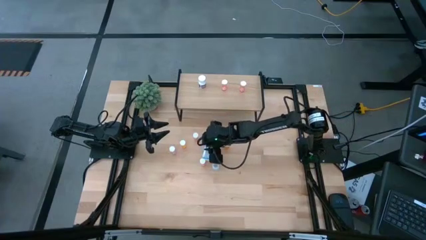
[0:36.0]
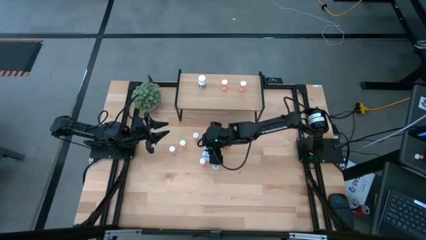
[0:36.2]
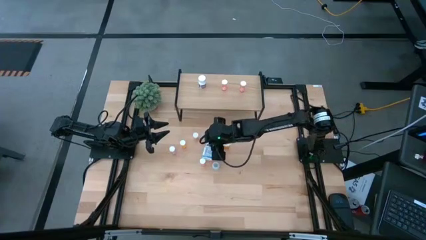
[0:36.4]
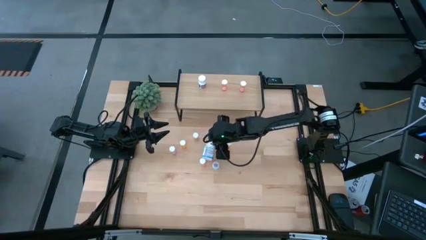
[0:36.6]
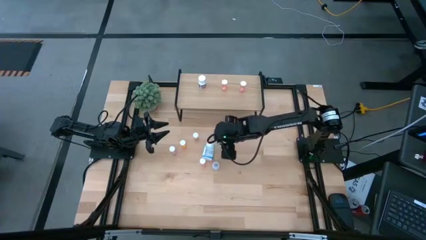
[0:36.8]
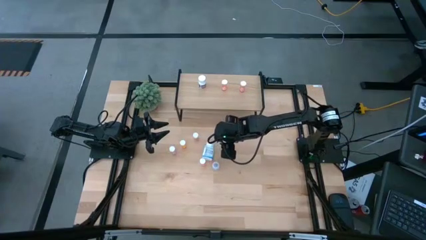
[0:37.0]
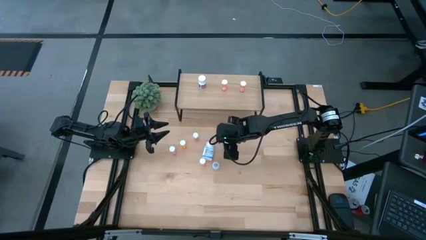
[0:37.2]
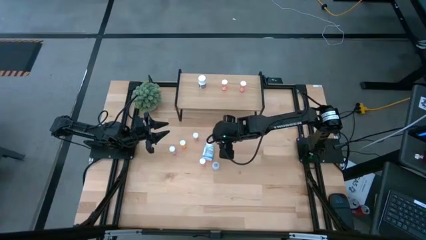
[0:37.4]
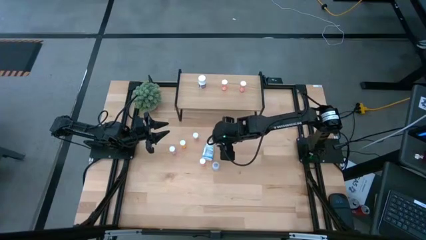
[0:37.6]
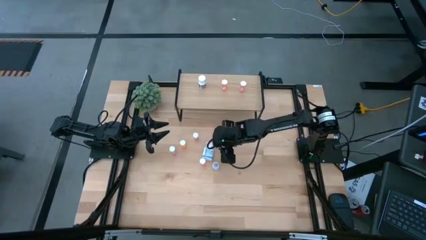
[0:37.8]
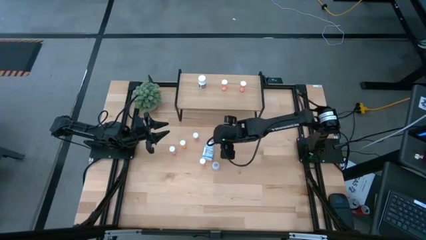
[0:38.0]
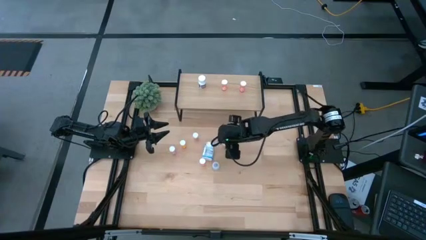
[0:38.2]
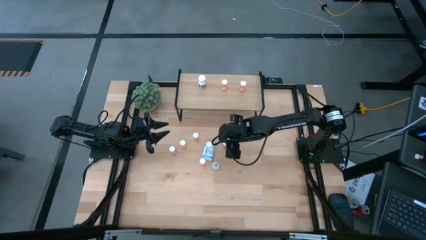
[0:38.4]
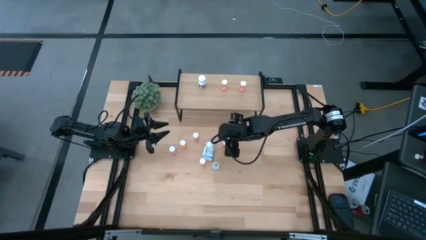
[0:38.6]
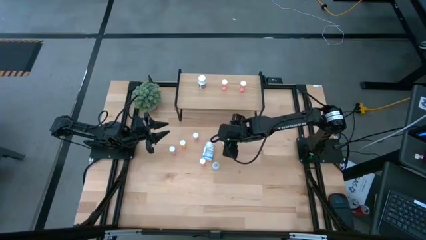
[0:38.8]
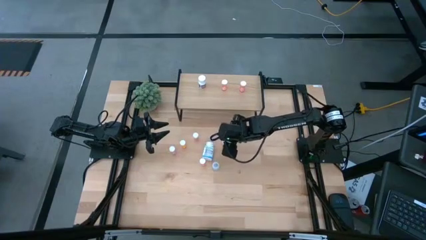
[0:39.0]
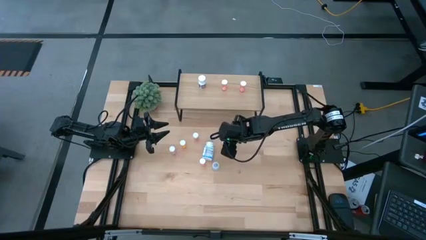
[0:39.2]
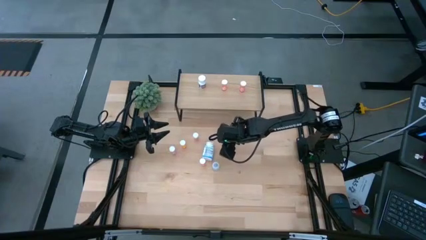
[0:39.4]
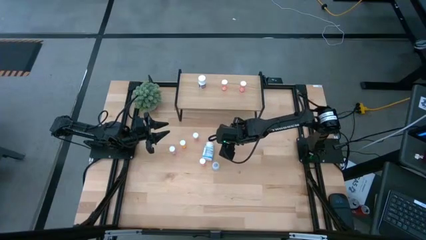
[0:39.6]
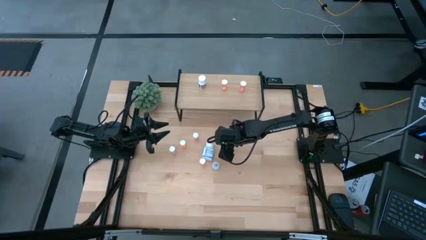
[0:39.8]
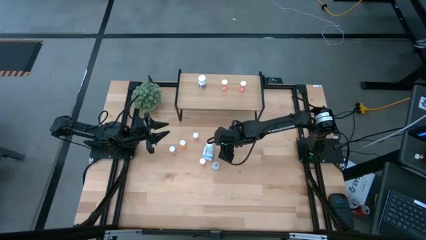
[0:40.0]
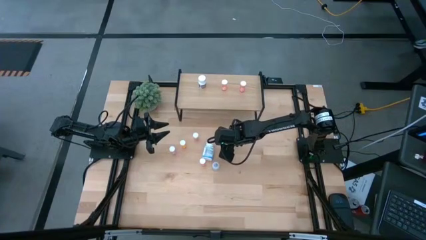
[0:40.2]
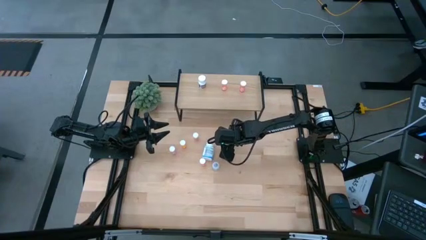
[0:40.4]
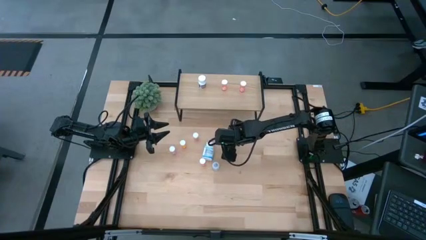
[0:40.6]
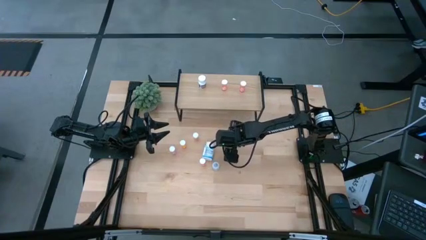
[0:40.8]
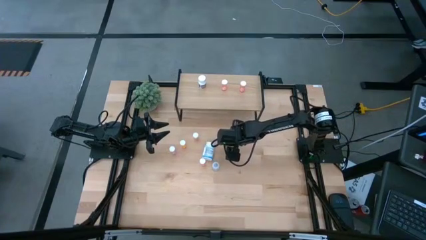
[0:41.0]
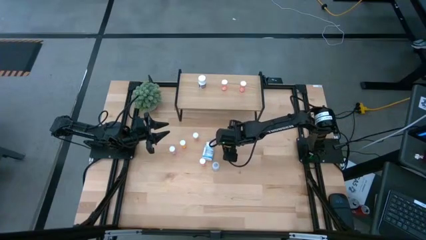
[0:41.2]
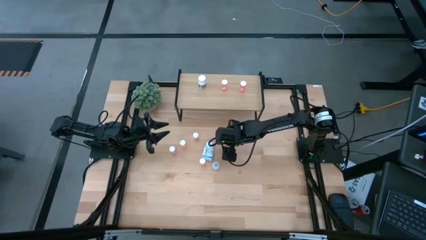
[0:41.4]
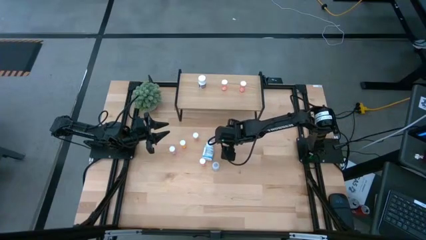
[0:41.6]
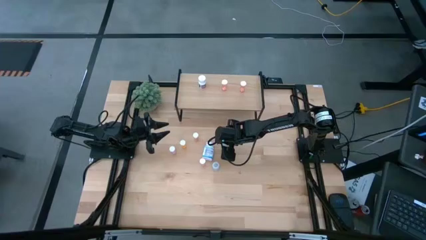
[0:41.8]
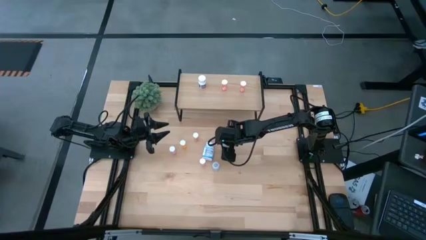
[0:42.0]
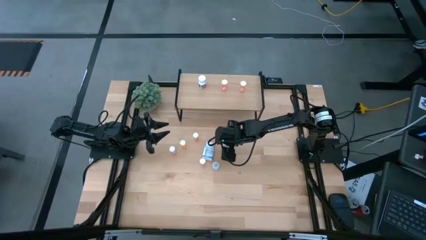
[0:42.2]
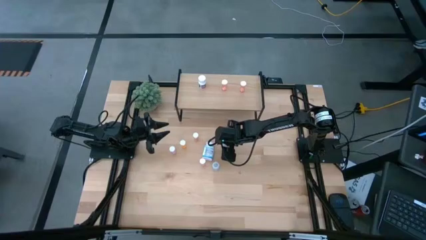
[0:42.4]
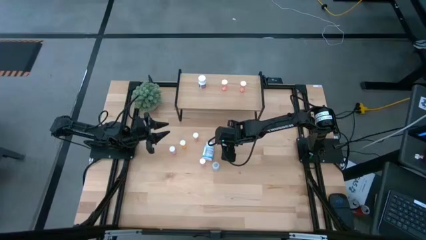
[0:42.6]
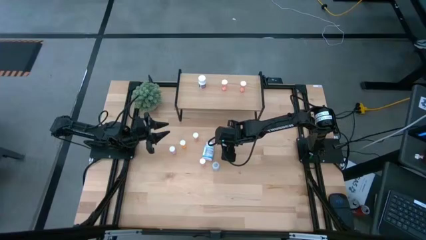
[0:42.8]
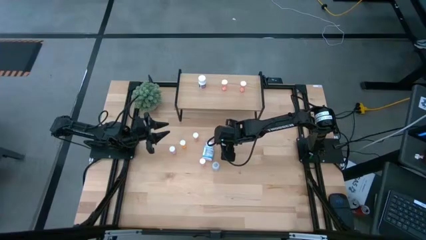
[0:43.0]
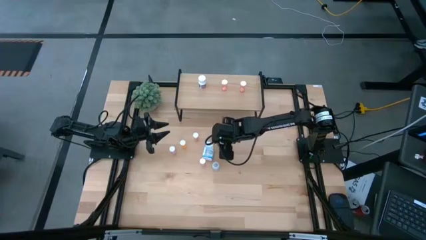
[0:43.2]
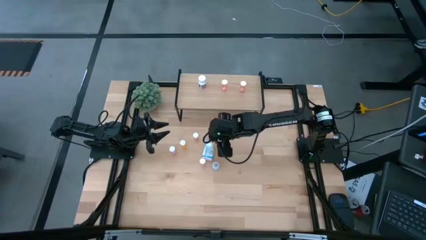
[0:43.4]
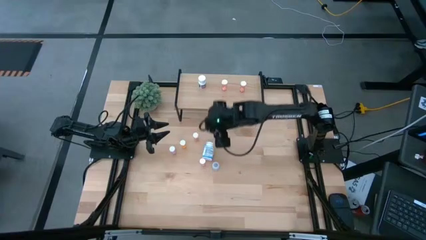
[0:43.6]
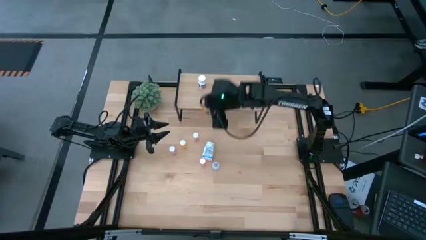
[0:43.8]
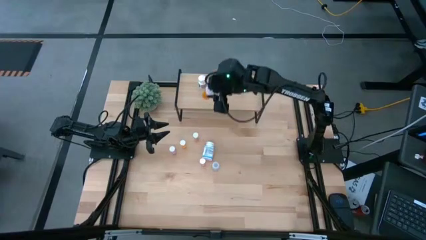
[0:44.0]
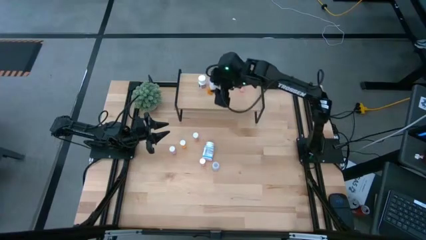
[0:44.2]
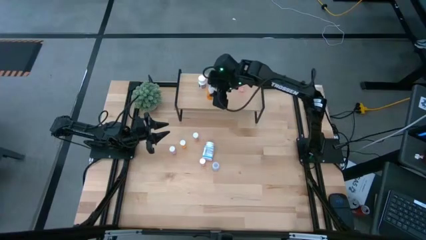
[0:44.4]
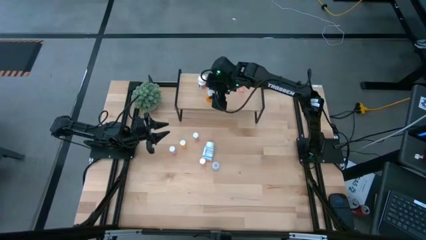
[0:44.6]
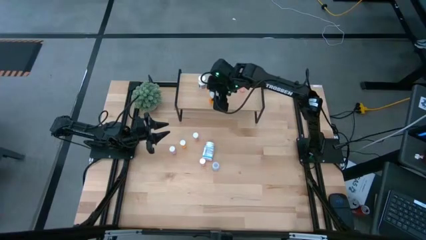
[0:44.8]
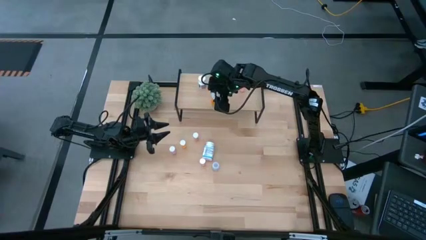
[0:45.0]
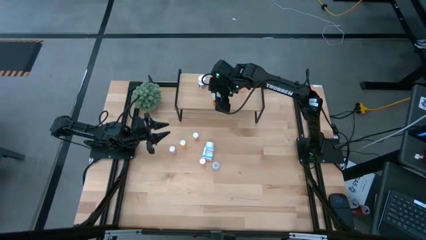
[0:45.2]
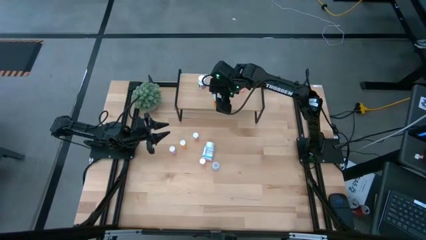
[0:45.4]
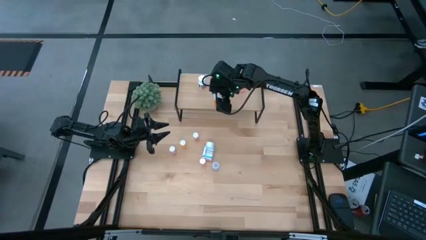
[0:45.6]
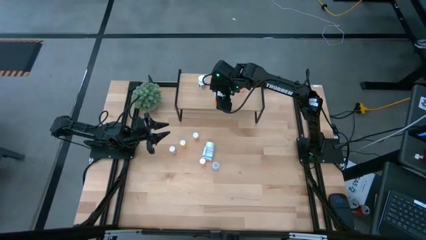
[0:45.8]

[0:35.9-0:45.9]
Task: Pick and place medicine bottles onto shelf by color
Put the large orange pill bottle on the shelf

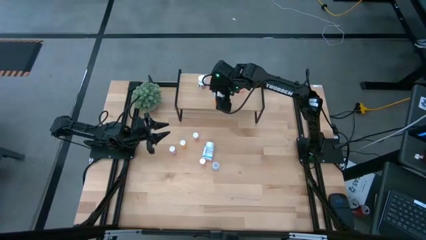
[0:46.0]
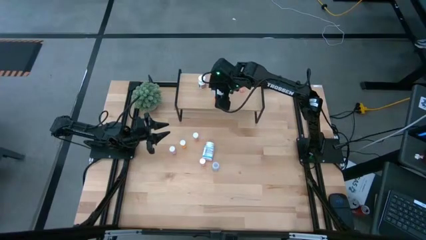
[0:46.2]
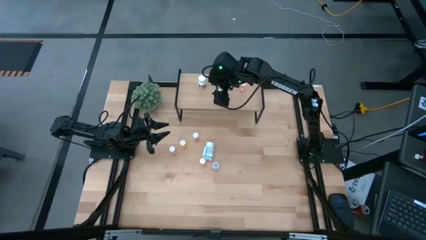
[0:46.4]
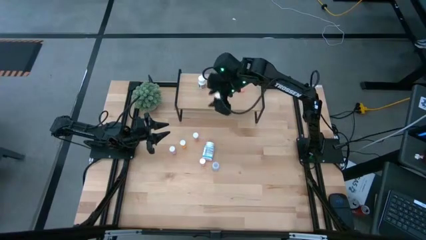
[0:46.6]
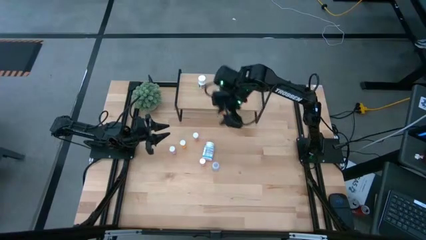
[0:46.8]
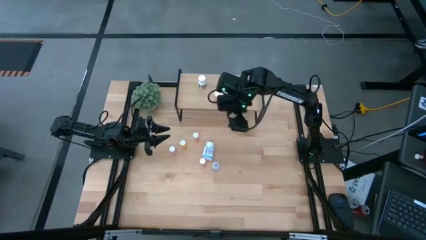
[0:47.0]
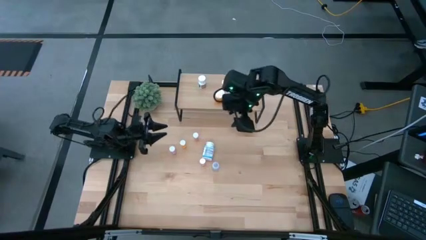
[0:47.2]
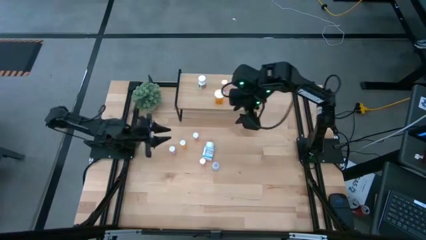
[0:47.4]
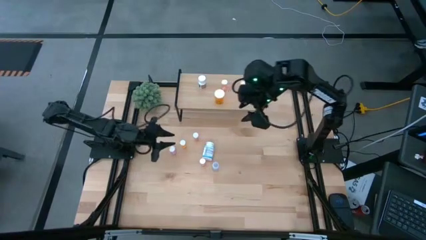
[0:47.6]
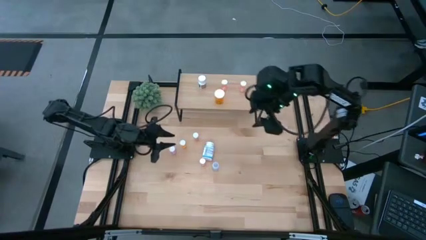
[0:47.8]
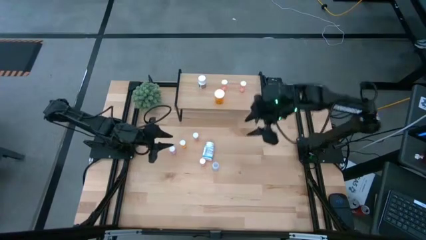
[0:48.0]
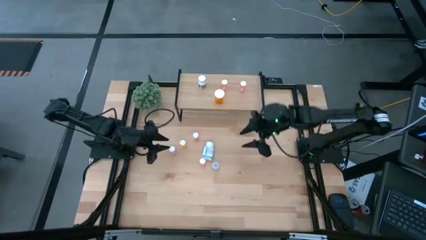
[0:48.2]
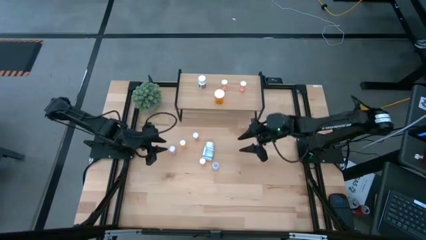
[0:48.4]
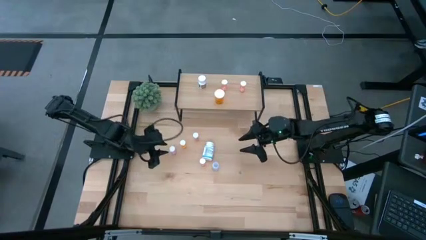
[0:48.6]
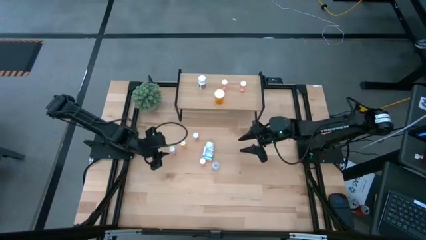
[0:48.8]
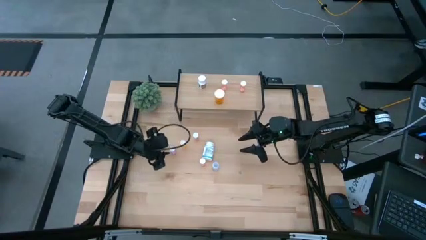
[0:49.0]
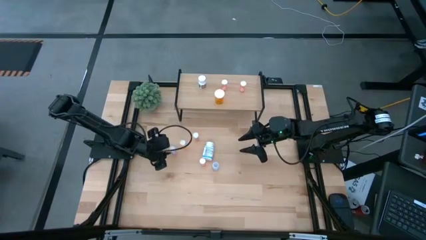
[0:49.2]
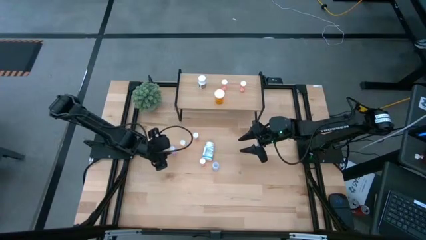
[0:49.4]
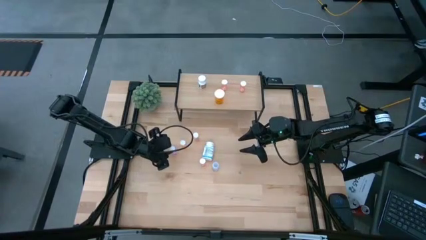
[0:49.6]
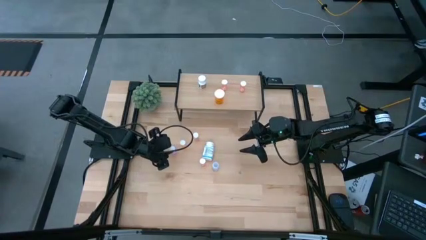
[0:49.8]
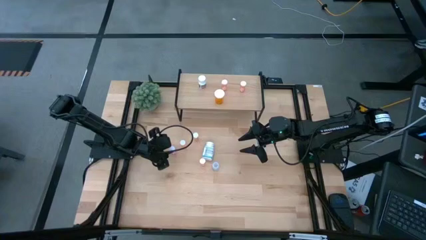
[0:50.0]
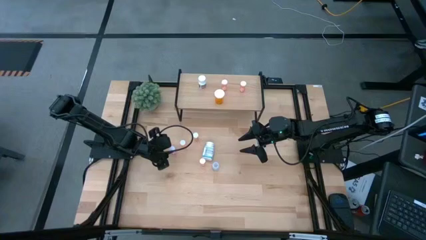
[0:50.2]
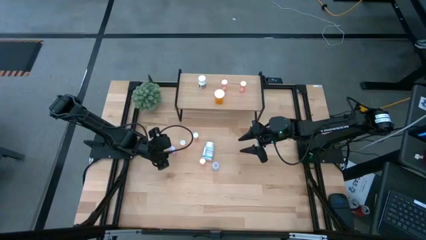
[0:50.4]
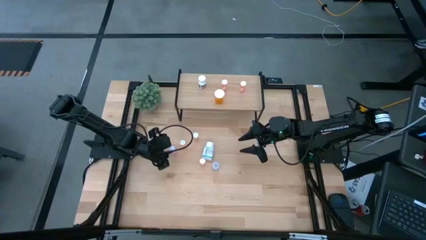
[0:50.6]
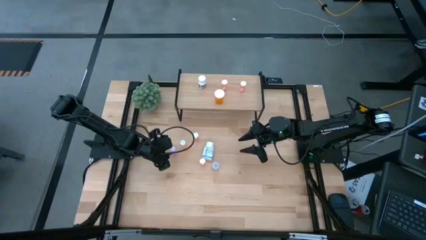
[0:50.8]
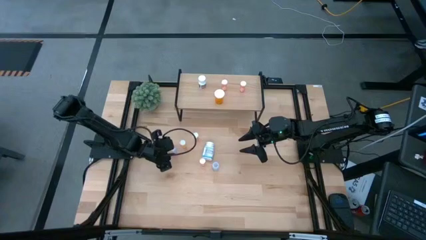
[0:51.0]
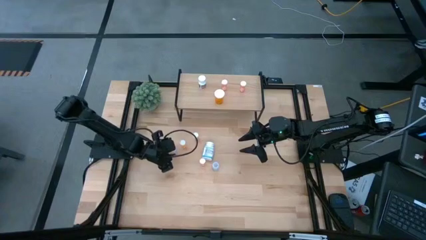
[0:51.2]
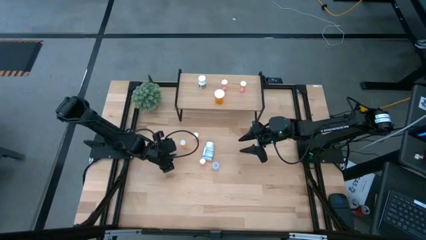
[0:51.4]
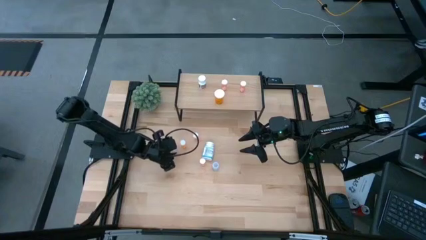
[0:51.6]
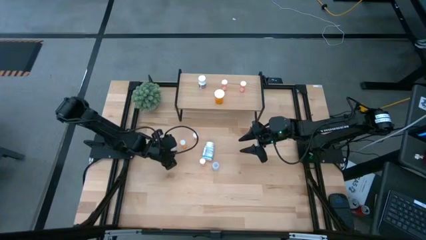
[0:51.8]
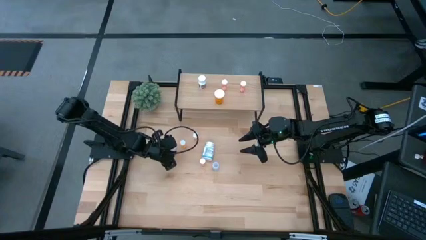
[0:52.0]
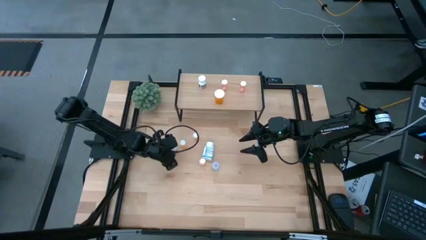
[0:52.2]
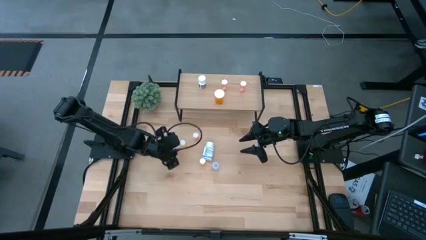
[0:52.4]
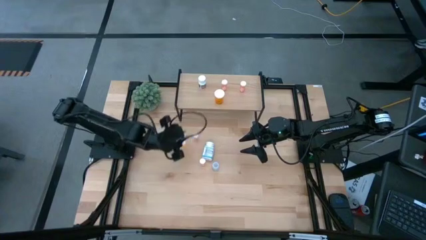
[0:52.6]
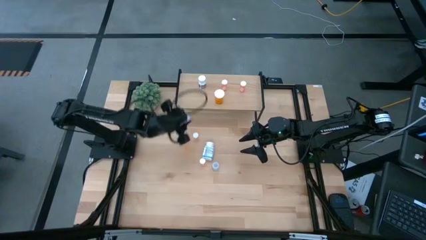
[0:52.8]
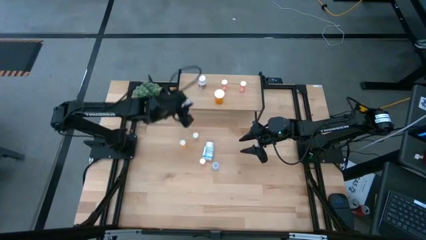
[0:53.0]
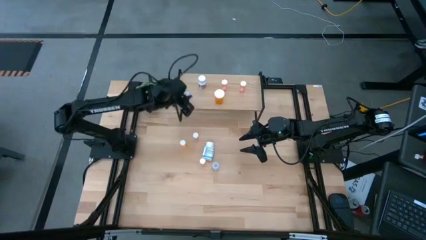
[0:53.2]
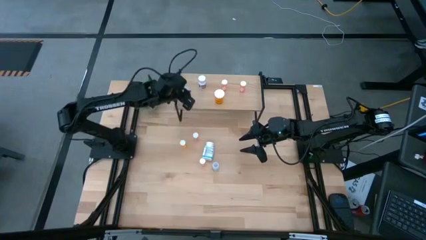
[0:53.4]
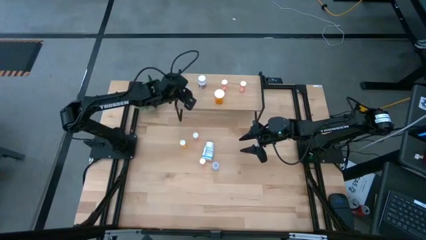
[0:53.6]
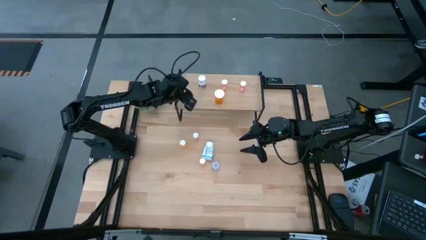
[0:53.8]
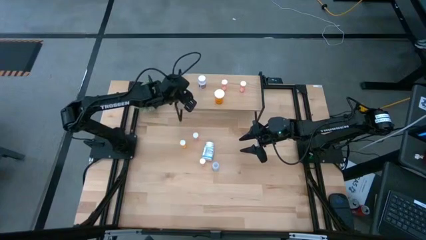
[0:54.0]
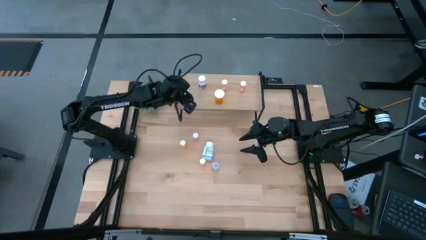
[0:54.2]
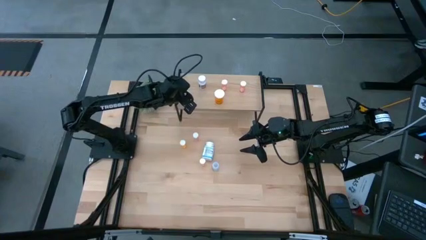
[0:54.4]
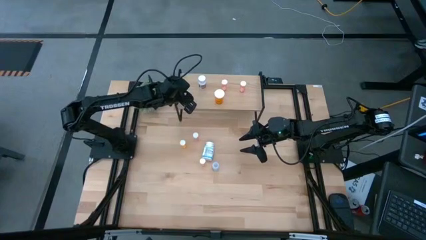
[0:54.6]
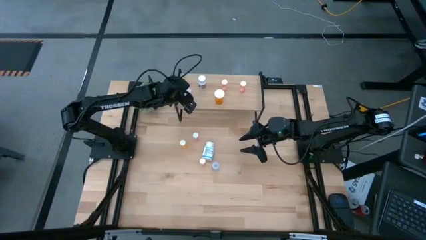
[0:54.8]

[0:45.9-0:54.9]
Put the purple pill bottle on the shelf
